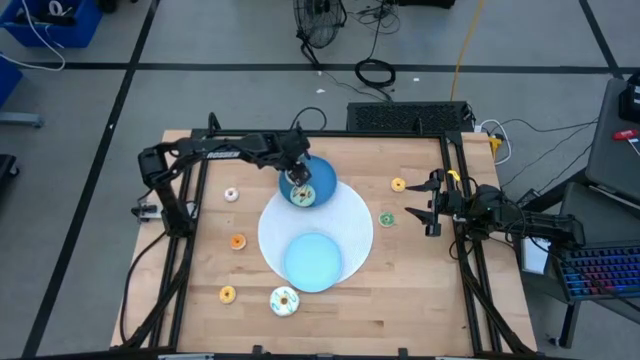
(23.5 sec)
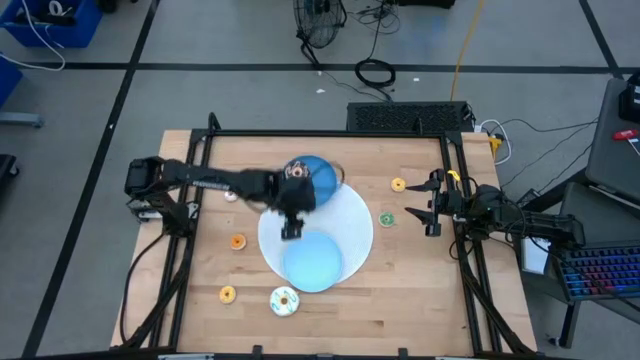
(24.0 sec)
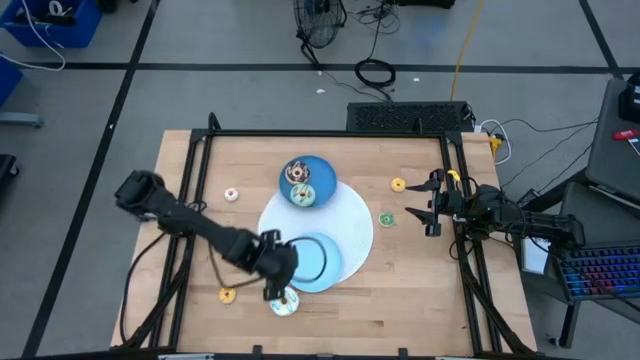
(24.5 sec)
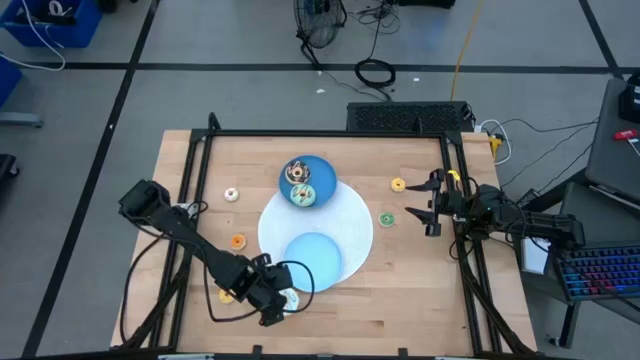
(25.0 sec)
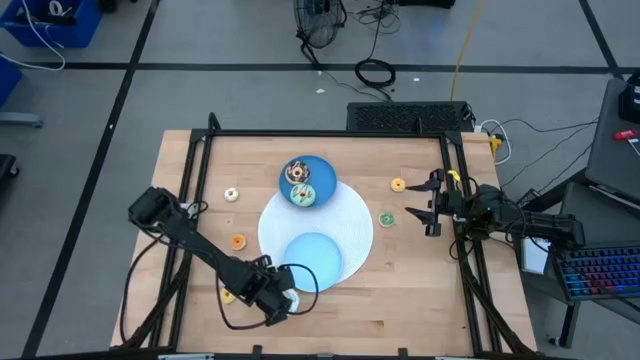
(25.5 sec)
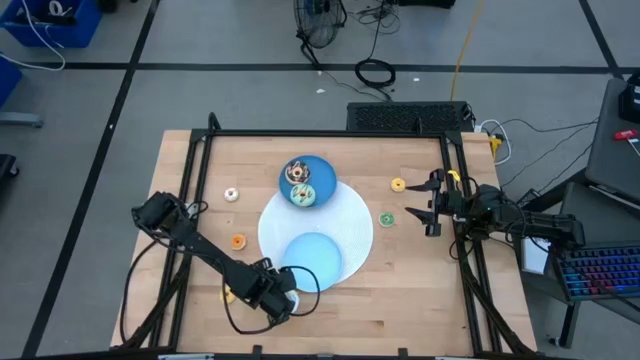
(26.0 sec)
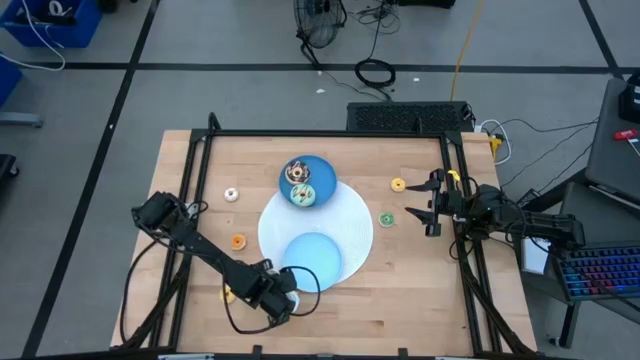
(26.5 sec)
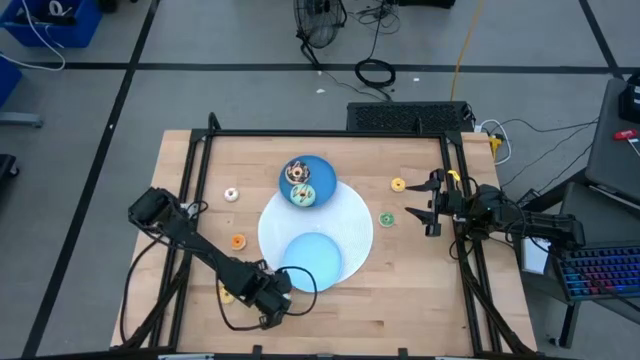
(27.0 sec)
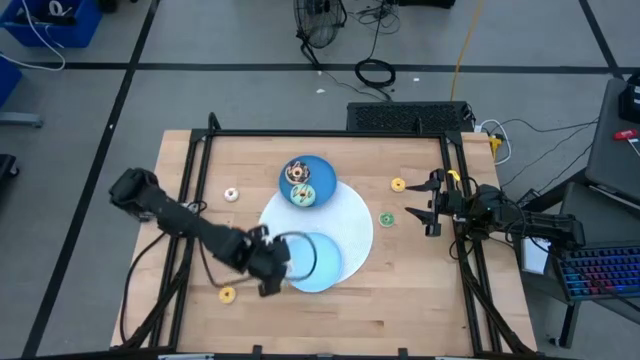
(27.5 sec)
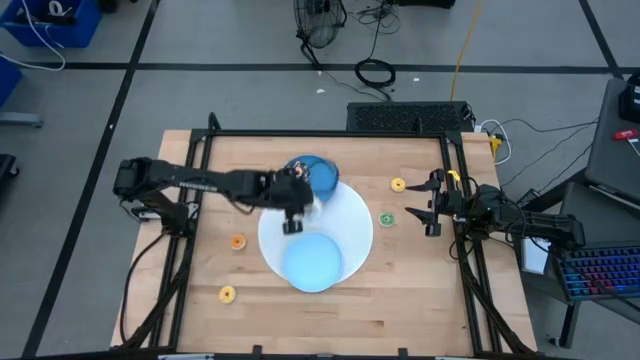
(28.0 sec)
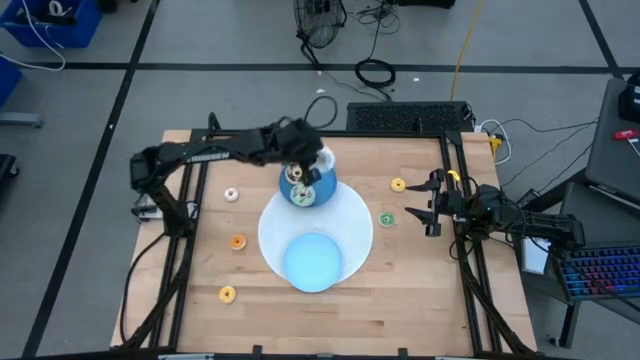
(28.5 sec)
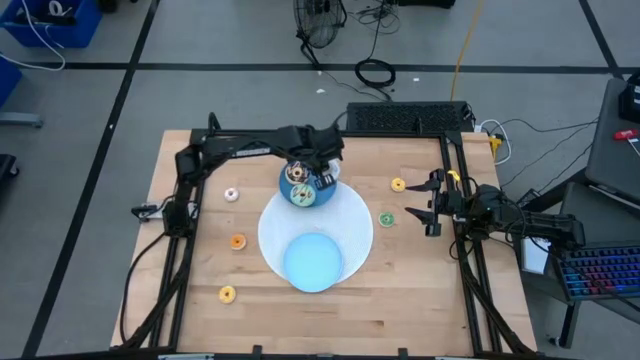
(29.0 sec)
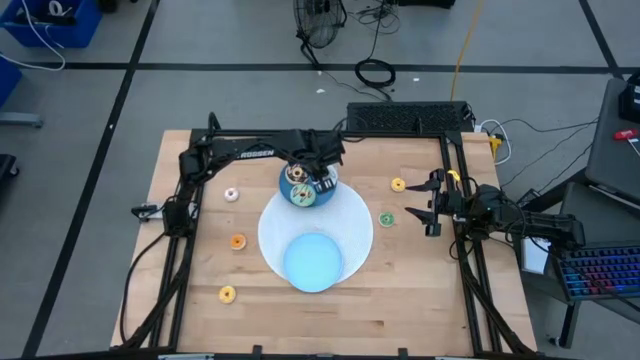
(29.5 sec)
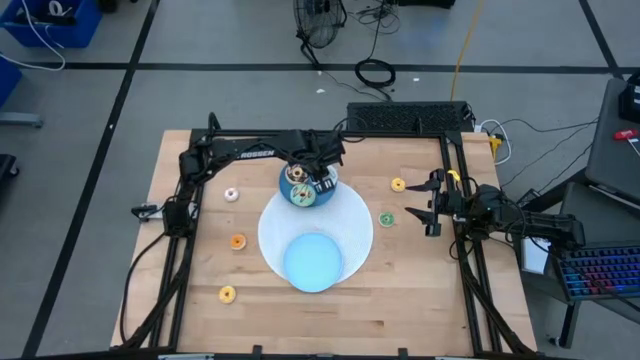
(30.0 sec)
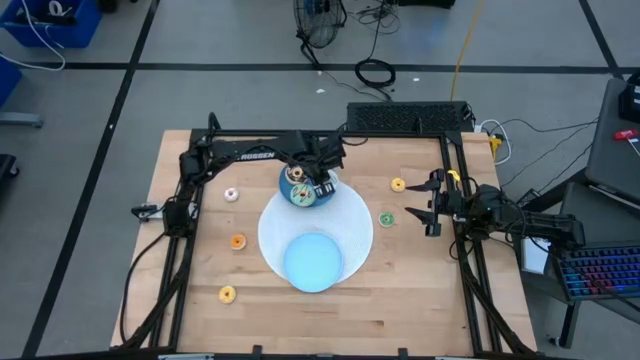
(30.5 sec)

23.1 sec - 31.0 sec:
Task: Pick & Place donuts
Put the large white donut on the blue plate

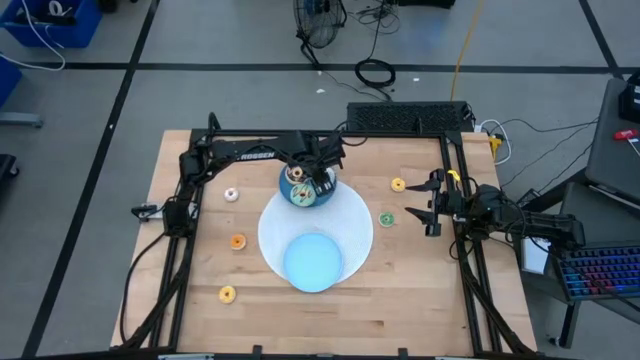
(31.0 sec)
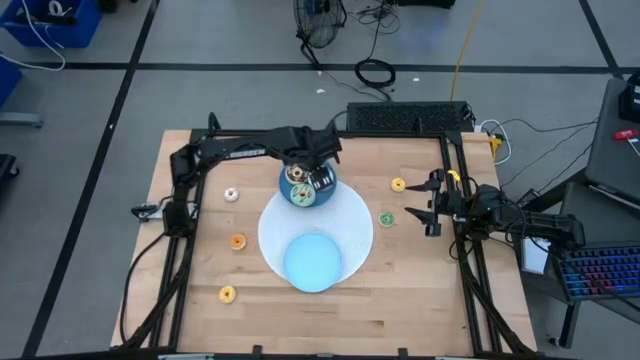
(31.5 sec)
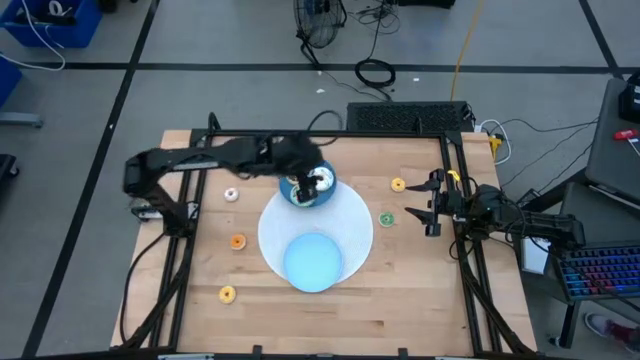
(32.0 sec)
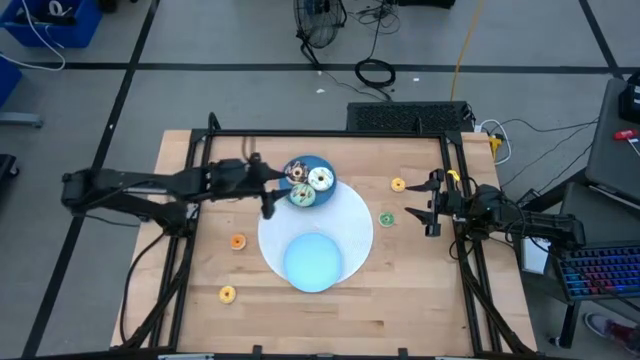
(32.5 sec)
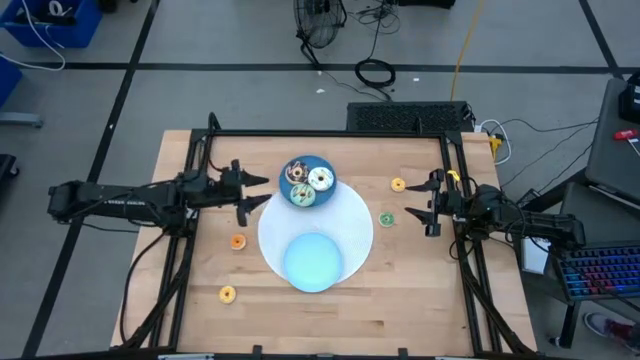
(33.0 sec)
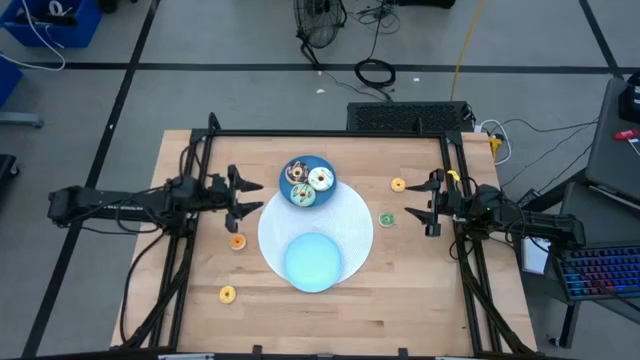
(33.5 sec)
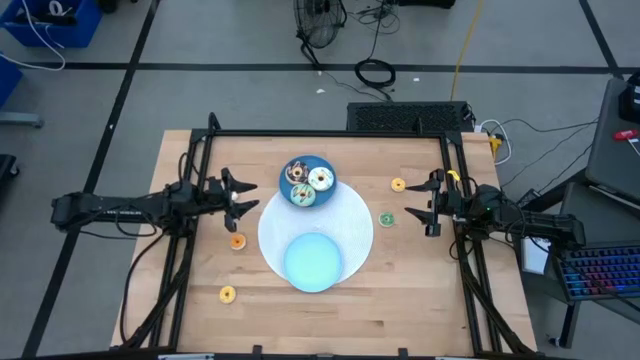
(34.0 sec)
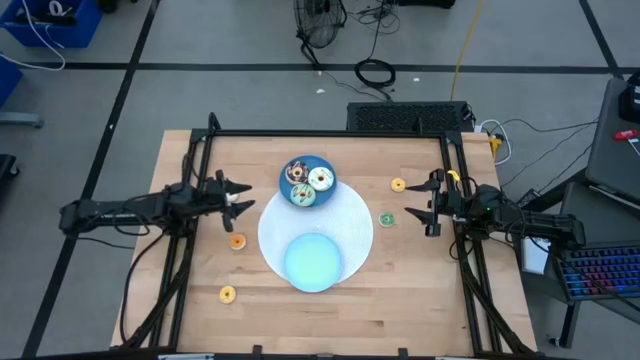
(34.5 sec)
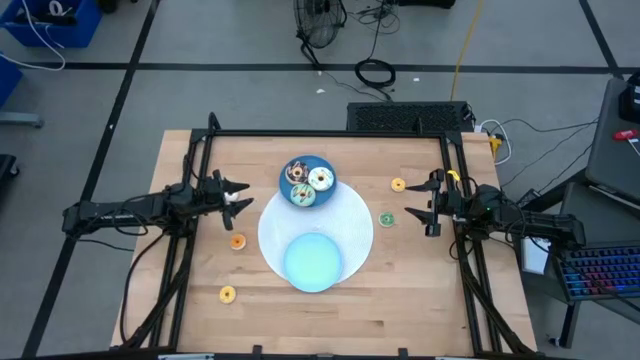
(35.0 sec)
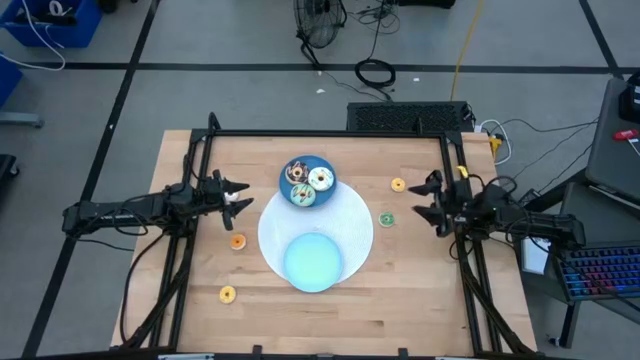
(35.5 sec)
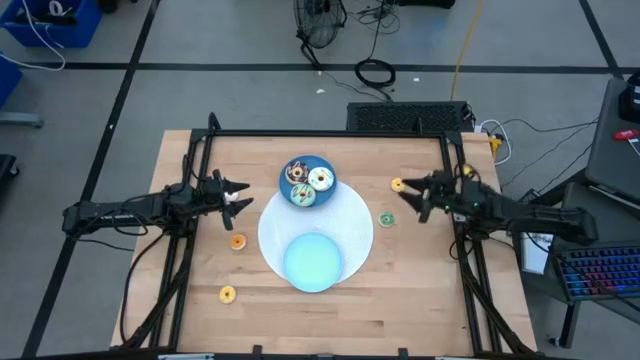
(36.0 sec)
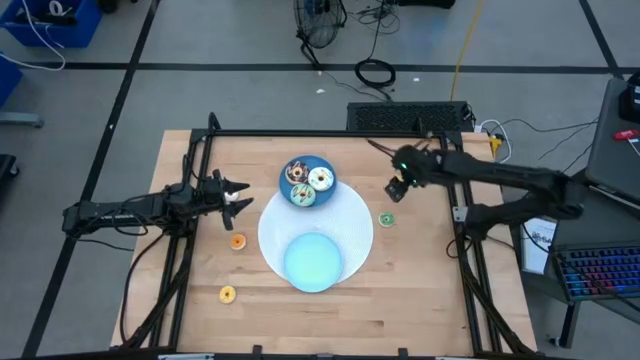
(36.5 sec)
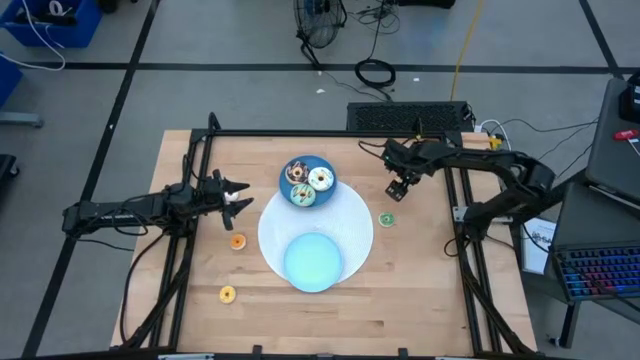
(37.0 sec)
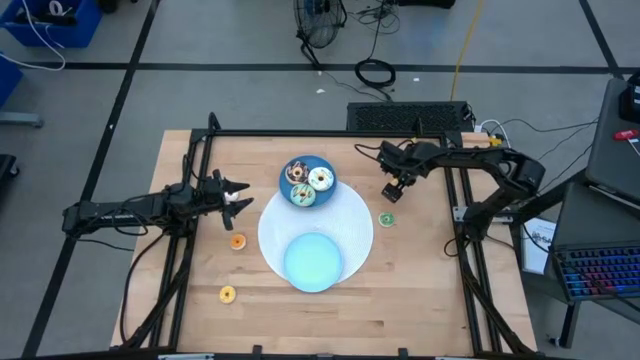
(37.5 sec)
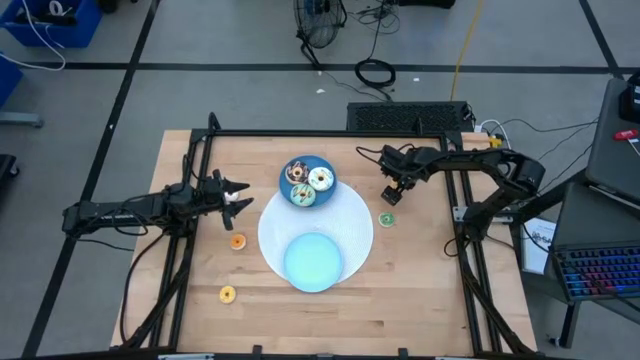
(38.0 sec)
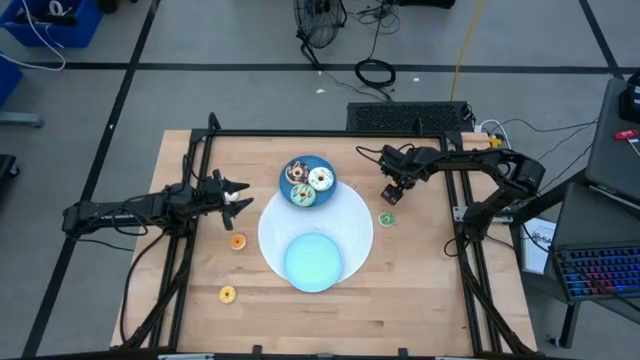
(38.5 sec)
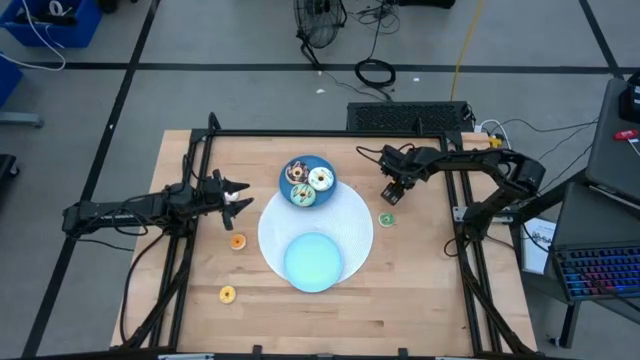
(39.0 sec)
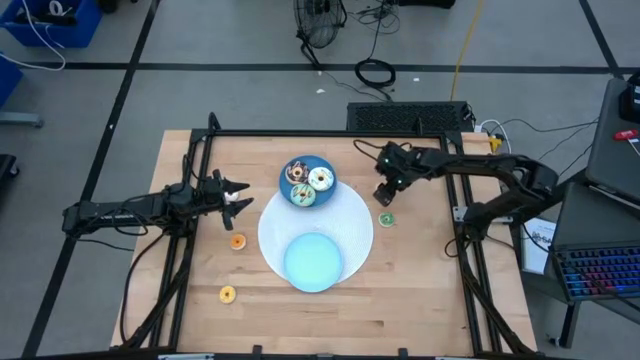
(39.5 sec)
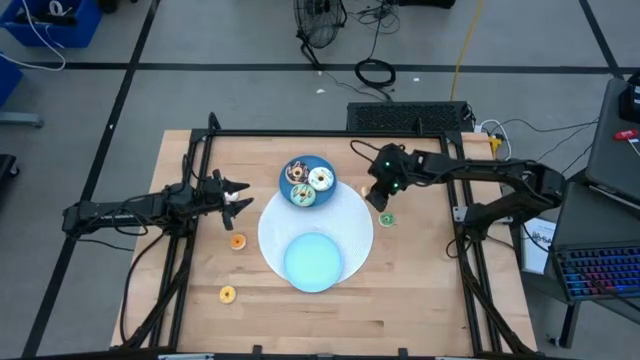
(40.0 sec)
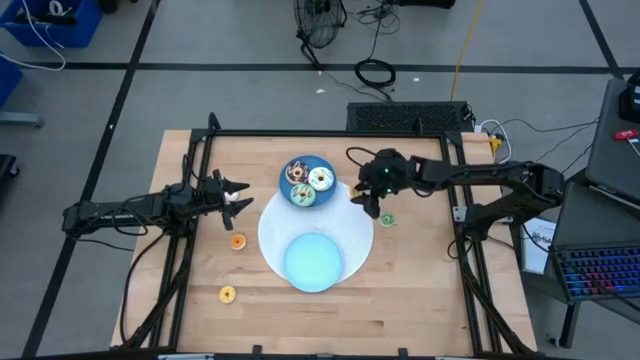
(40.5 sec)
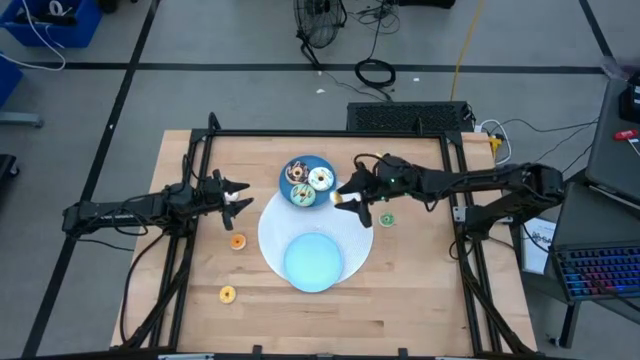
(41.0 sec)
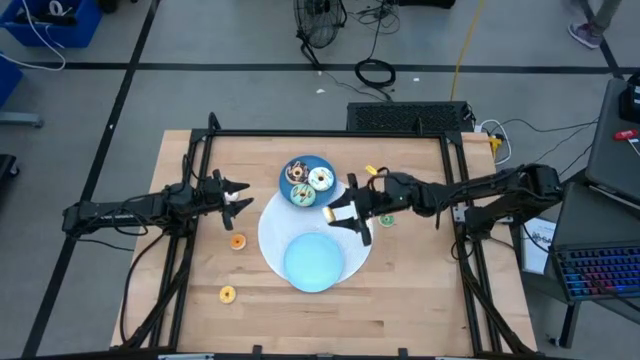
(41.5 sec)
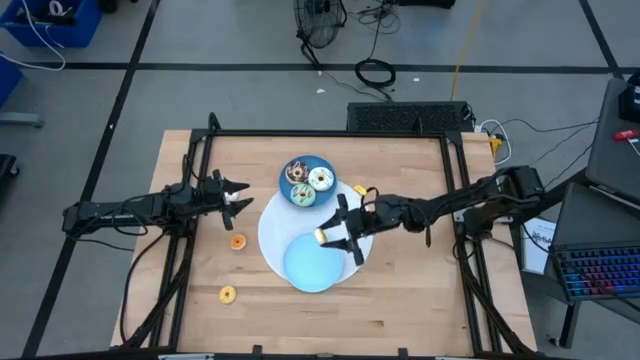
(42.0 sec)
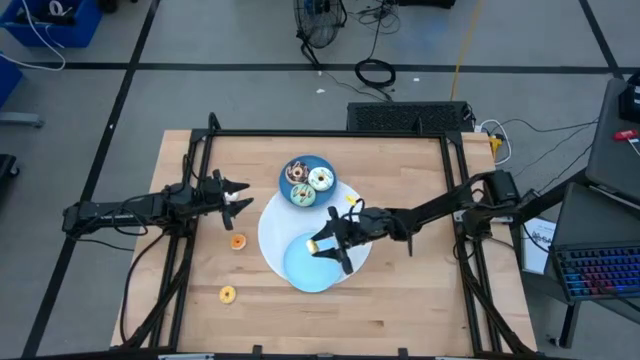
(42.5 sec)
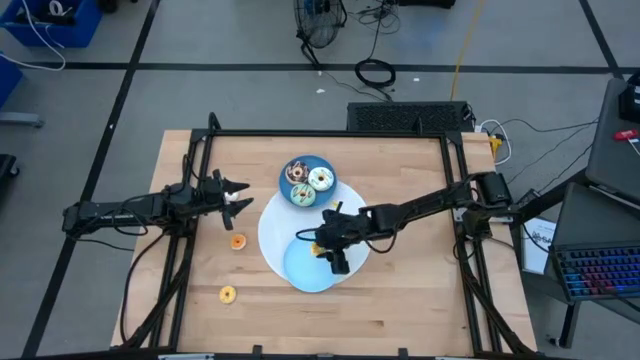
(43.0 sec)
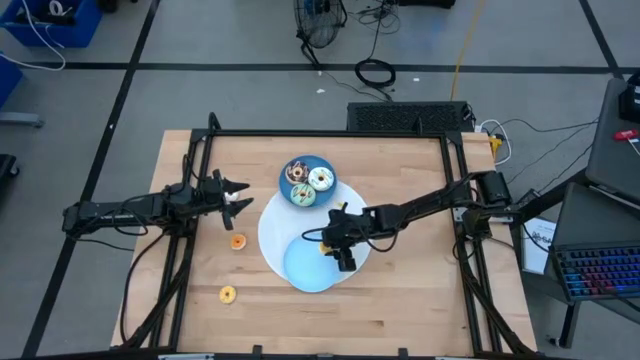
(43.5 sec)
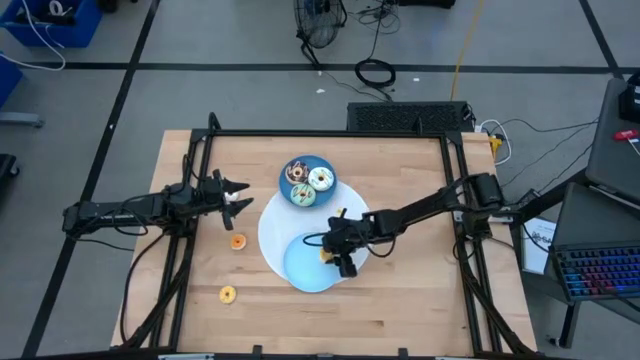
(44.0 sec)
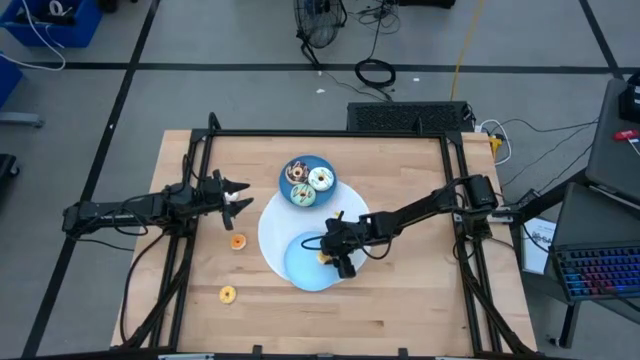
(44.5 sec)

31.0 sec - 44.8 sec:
Put the top small yellow donut on the light blue plate
